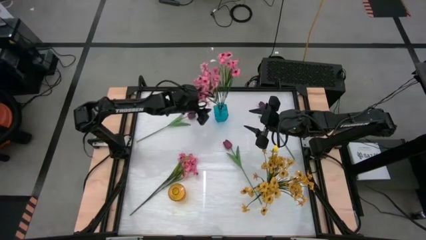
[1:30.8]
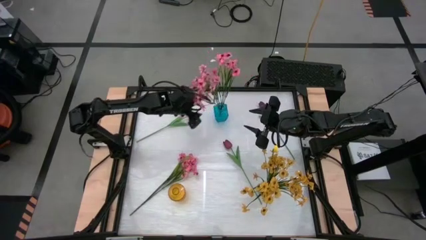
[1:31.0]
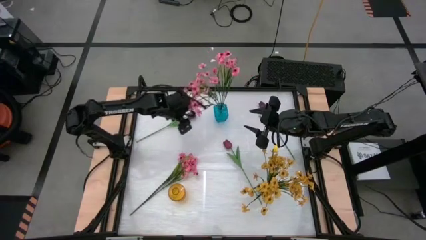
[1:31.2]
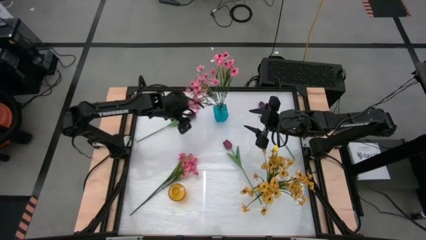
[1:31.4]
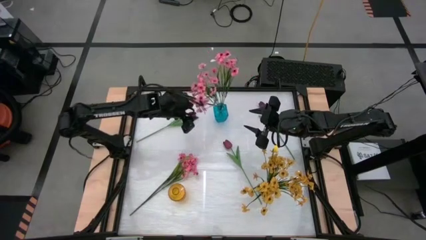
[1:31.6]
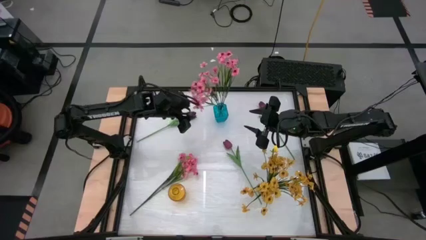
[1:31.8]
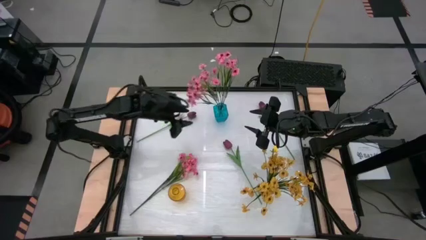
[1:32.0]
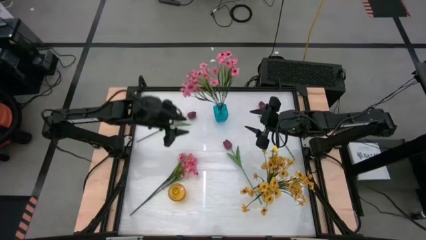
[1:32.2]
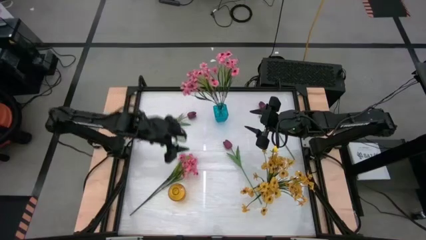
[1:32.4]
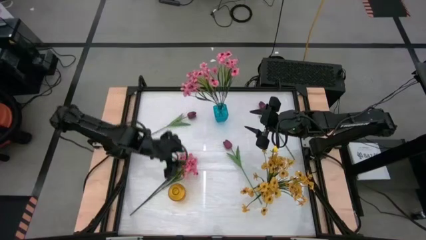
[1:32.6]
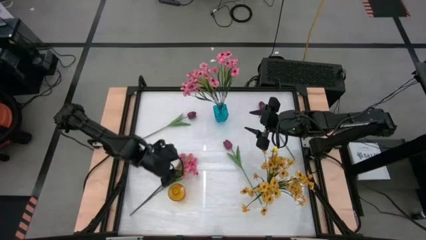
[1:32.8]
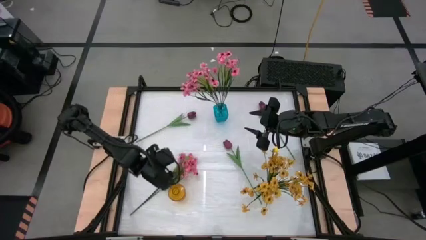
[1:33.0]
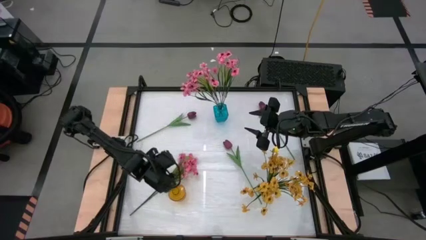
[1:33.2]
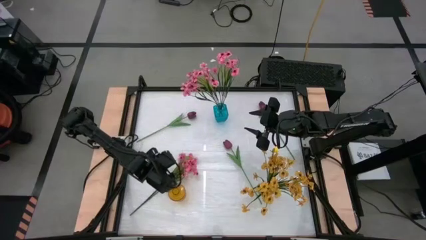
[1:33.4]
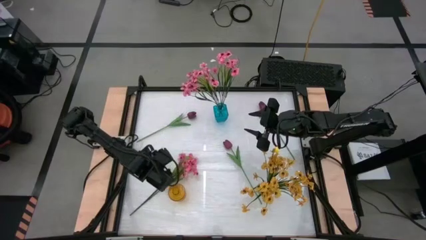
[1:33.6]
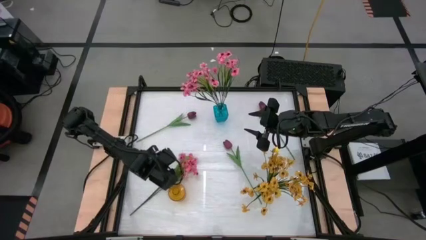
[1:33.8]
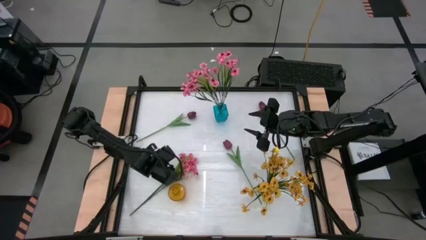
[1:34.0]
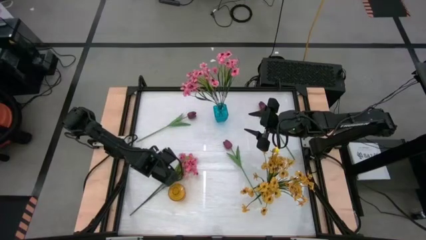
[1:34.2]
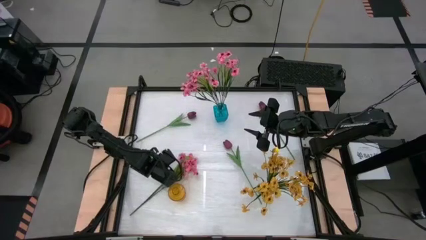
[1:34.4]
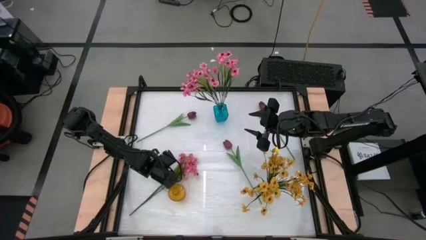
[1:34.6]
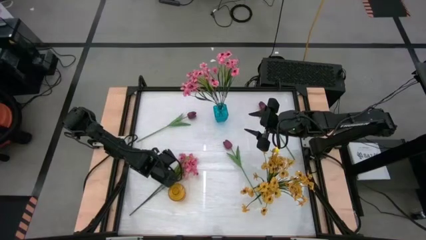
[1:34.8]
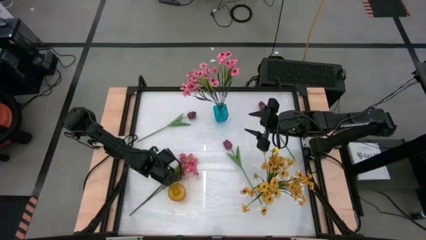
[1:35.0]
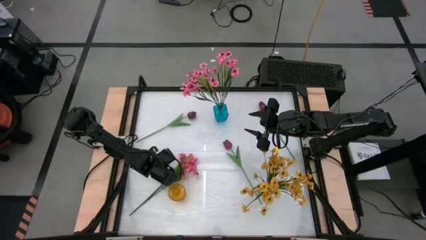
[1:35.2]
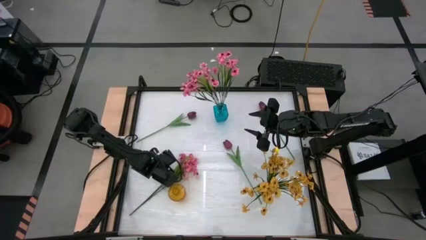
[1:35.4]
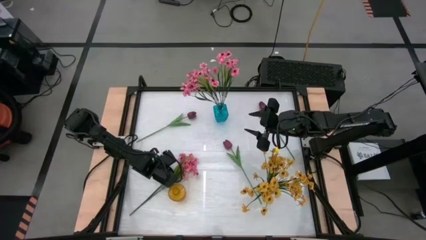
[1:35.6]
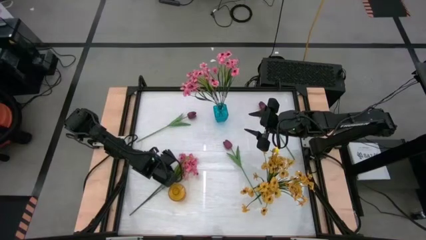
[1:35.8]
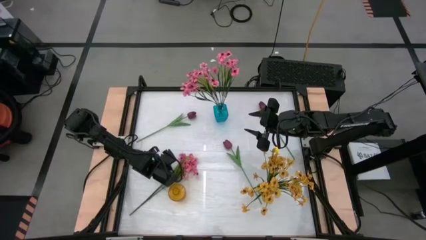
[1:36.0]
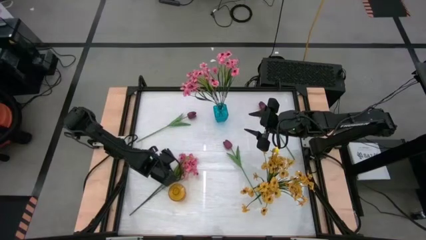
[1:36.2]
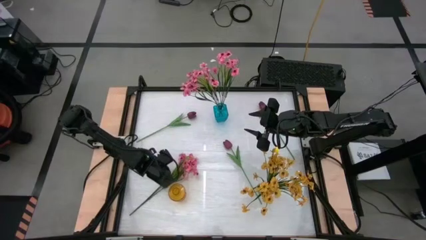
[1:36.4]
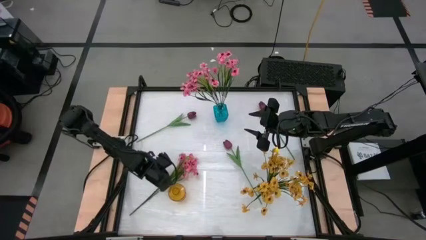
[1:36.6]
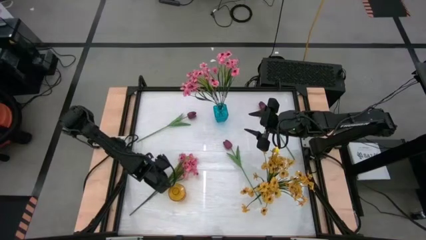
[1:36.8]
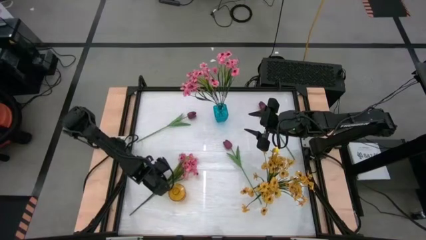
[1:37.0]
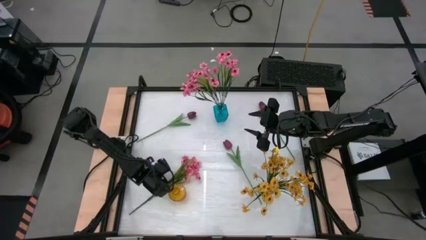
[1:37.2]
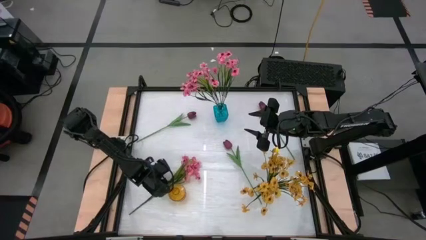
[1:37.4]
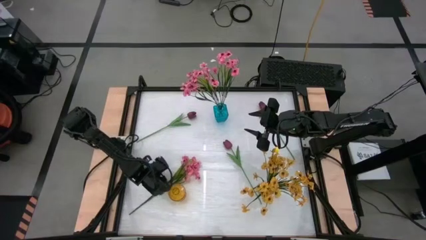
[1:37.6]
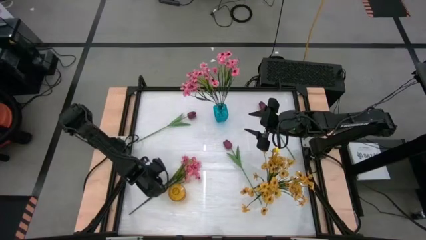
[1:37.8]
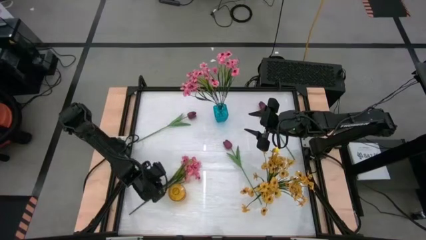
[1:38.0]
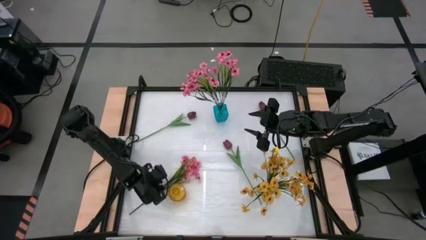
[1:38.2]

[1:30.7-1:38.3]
Task: Sort flowers into vase by color
Put the pink flowers into the blue vase

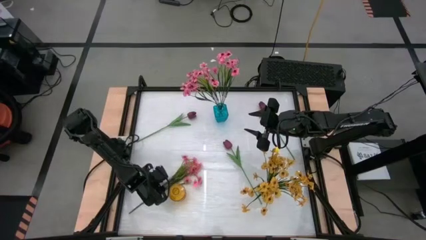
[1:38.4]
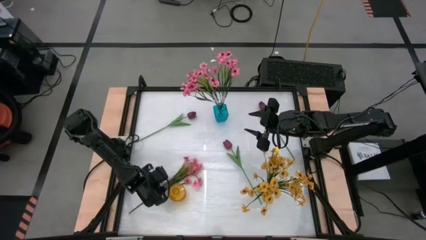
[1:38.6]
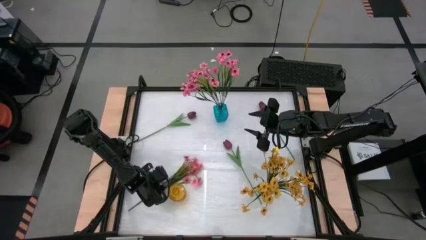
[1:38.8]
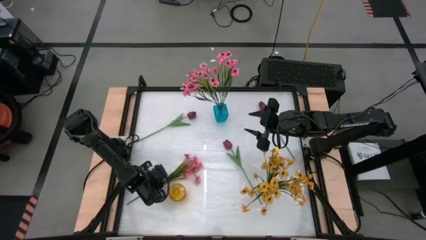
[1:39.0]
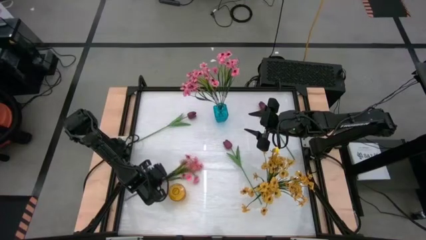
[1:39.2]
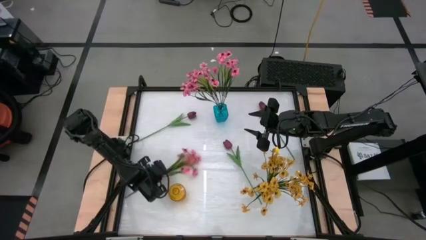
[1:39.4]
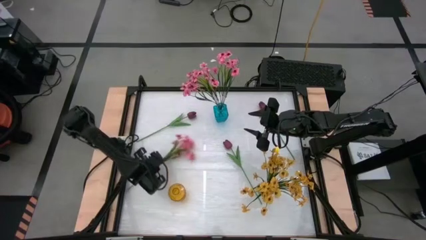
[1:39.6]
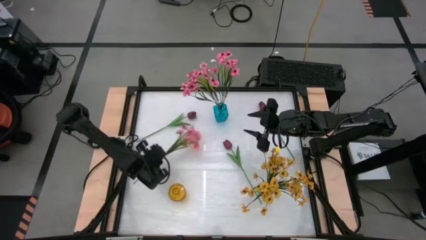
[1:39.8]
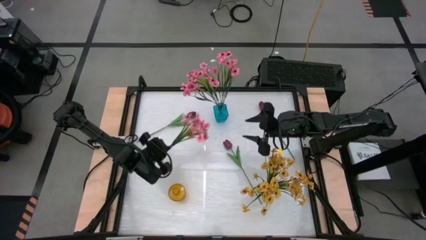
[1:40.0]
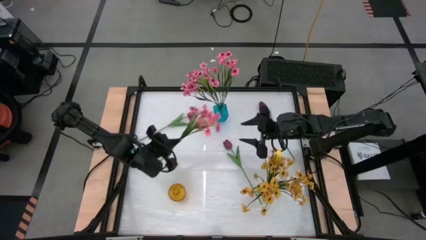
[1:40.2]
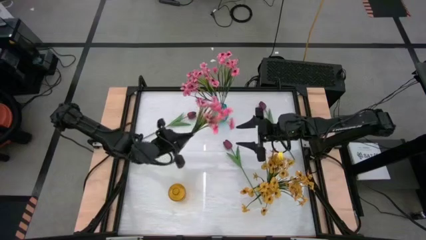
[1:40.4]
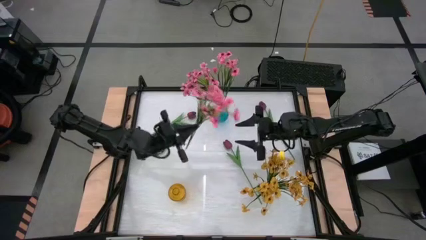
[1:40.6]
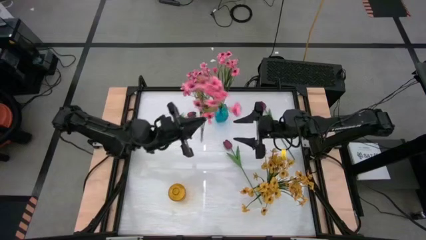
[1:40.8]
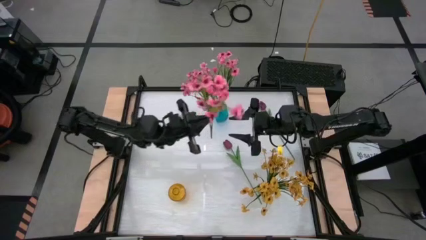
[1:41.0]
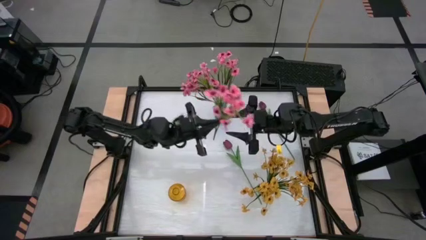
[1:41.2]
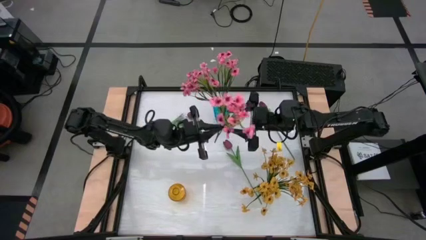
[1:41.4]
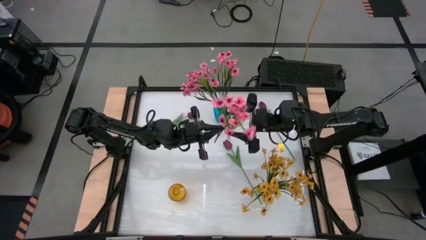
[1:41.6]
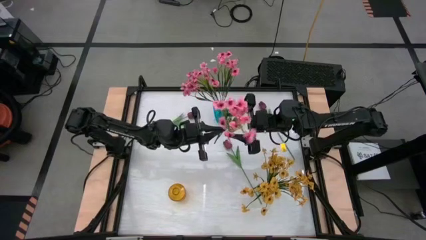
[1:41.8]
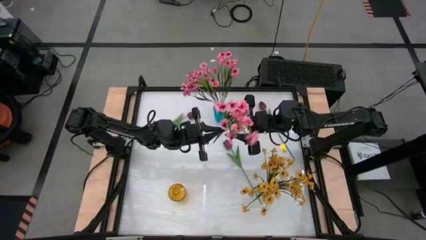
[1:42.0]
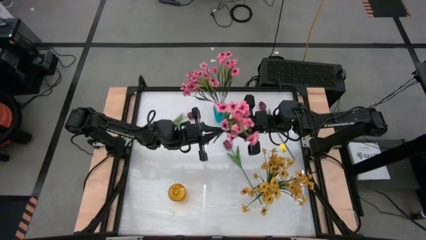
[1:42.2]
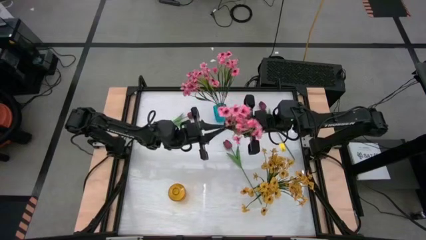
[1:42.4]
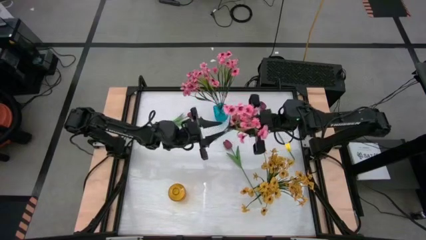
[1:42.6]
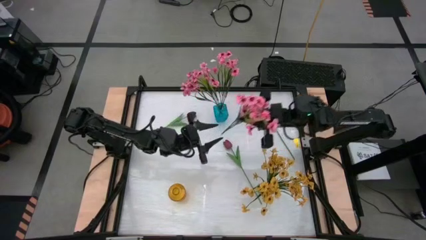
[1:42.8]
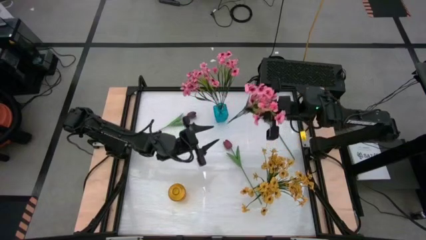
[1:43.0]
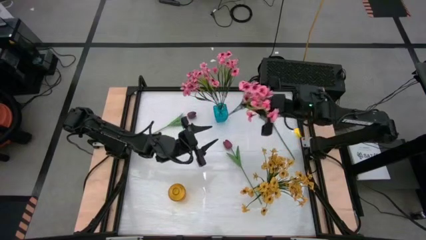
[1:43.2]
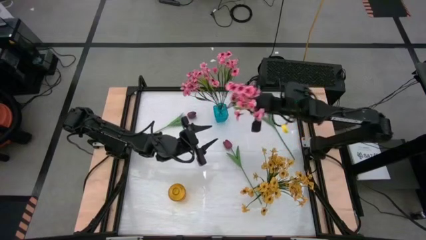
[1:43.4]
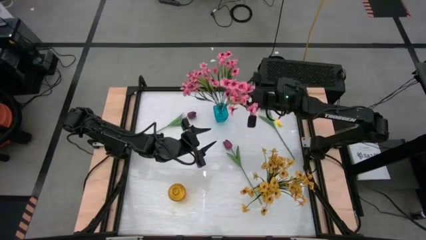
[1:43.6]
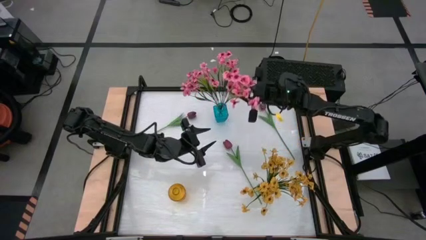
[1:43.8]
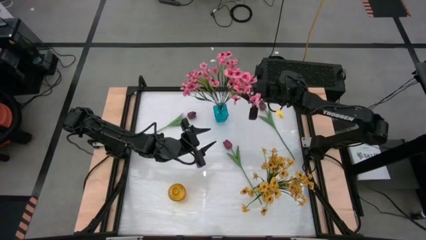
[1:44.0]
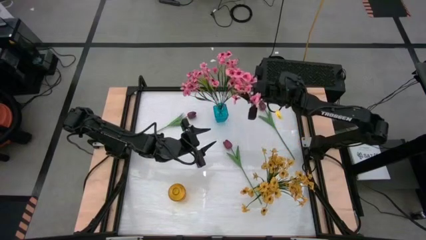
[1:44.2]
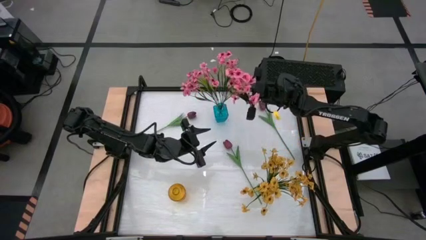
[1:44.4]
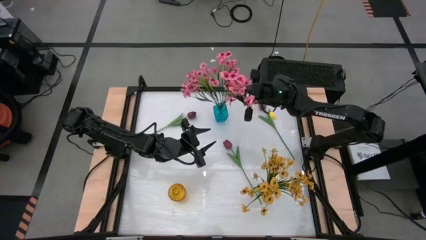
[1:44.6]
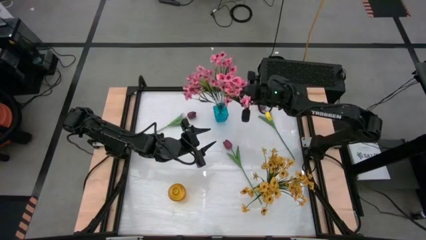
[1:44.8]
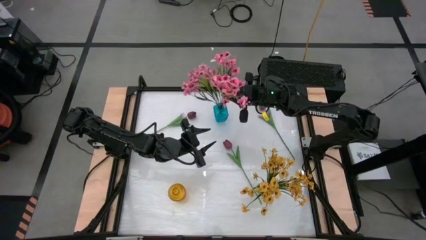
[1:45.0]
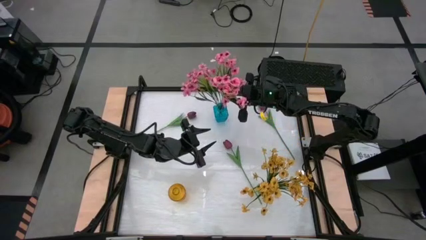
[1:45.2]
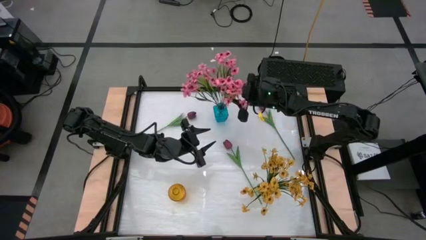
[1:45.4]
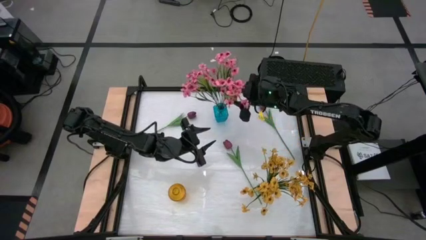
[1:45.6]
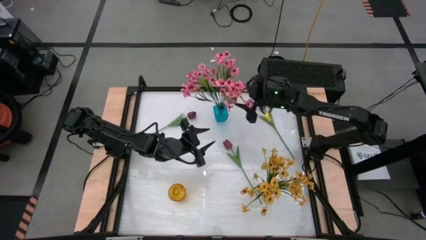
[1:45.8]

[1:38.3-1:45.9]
Put the top pink flowers into the blue vase

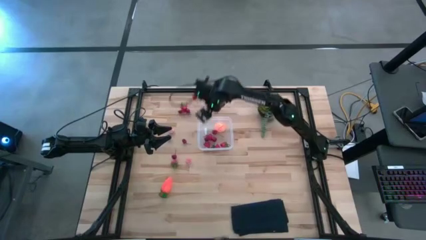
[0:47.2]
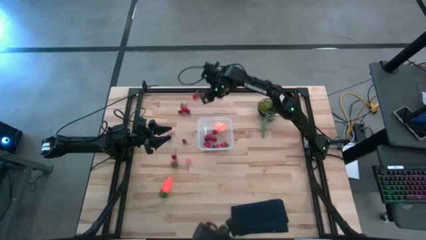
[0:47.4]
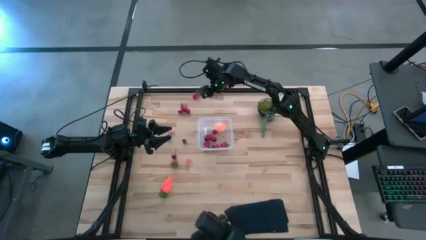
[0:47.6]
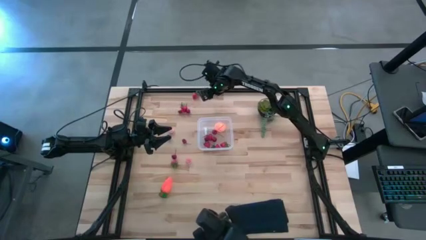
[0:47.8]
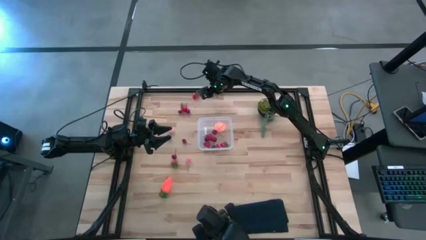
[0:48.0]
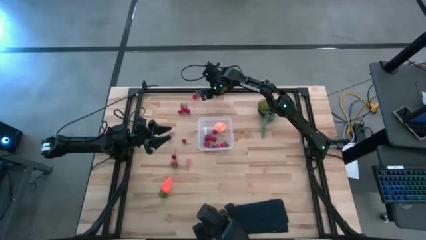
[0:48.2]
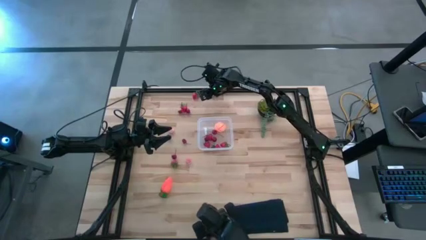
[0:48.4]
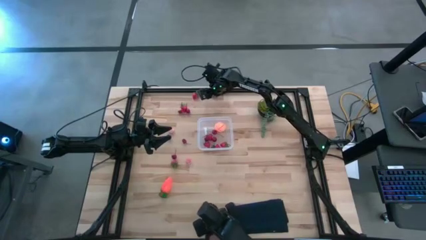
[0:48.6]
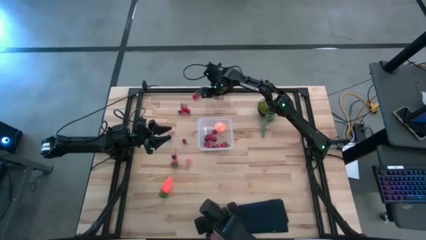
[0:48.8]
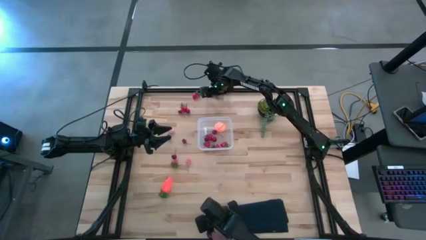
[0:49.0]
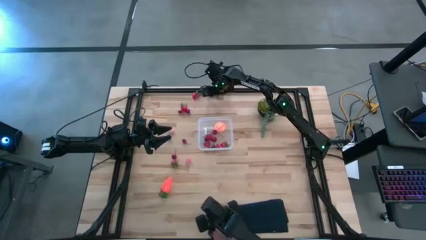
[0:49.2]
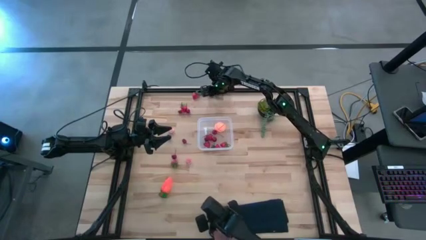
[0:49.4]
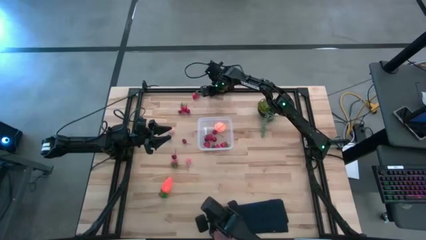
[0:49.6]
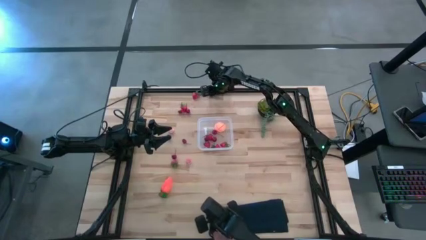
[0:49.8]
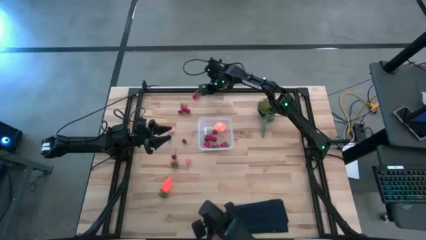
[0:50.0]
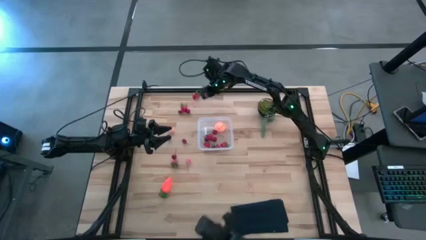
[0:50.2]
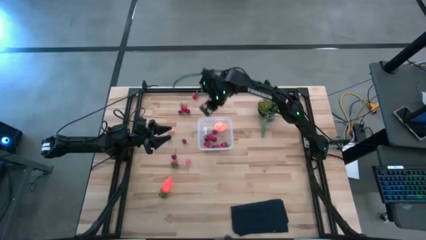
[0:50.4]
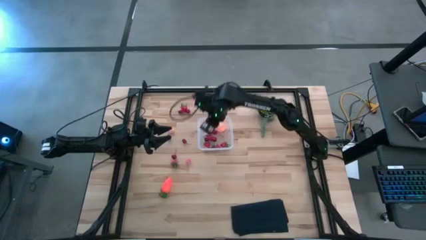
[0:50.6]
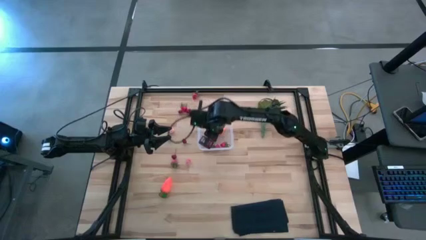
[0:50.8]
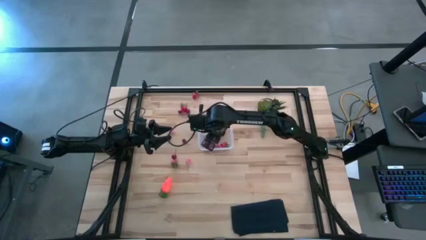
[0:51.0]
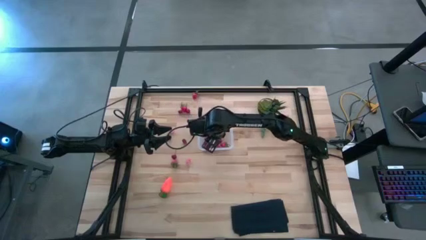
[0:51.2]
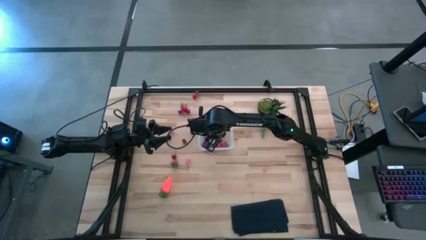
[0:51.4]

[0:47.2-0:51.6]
Task: Pick and placing Produce into tupperware
Put the red cherry into the transparent bin
